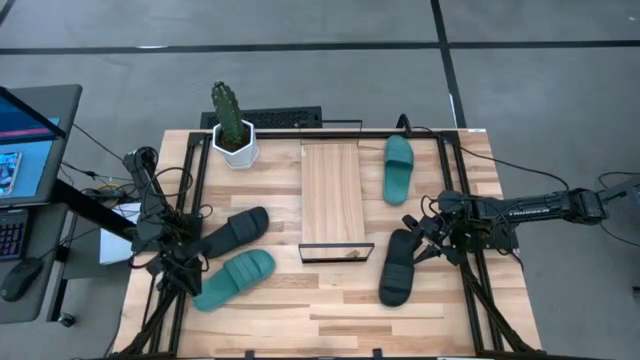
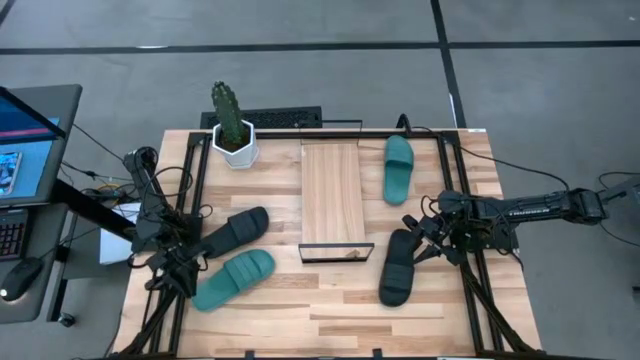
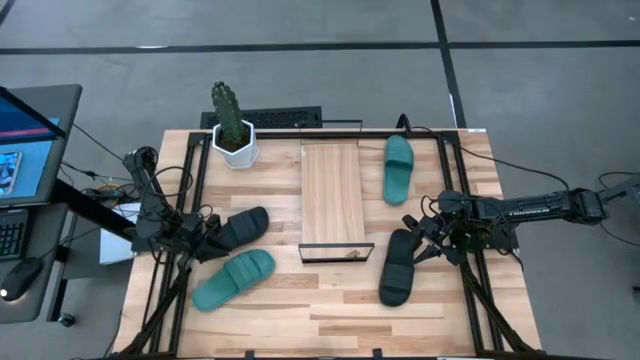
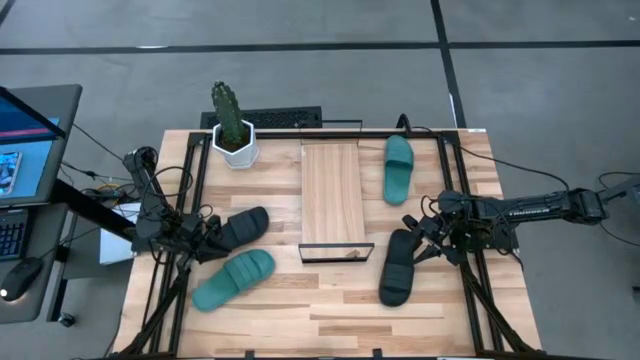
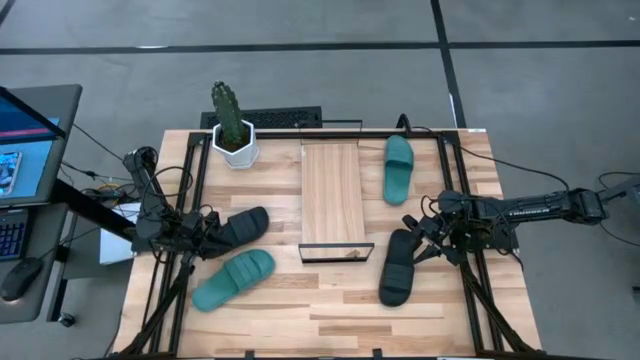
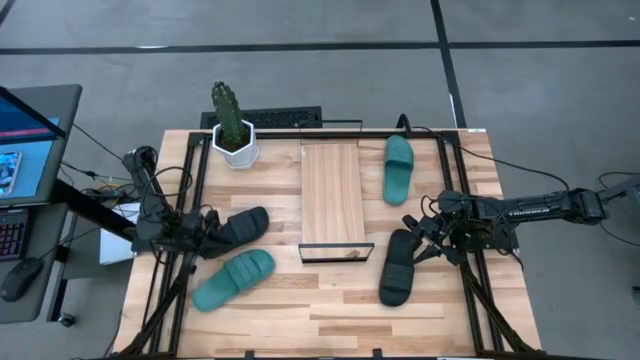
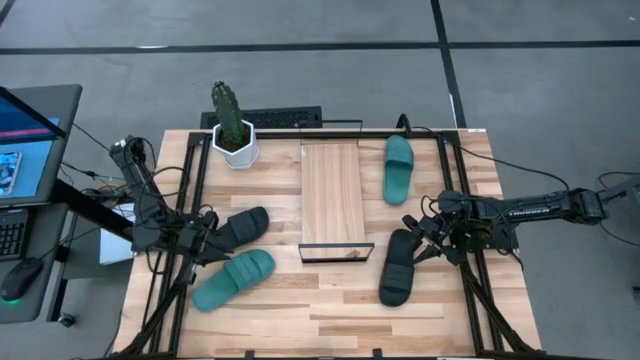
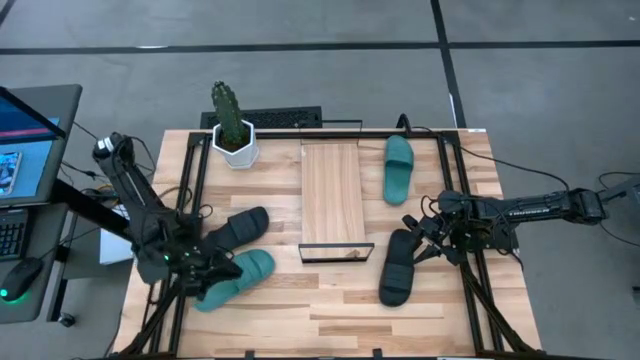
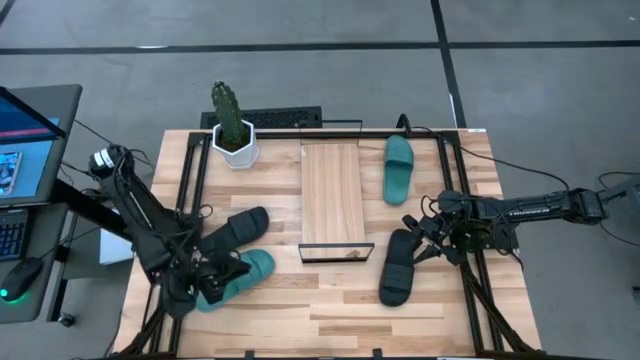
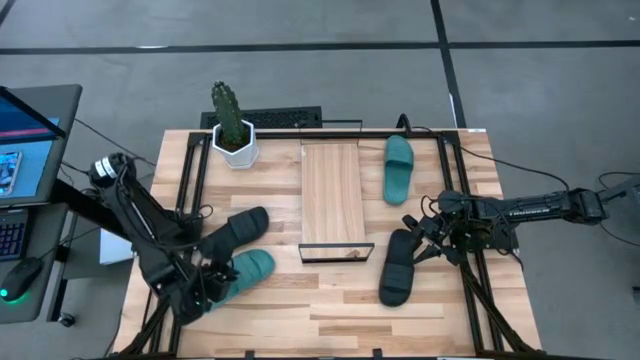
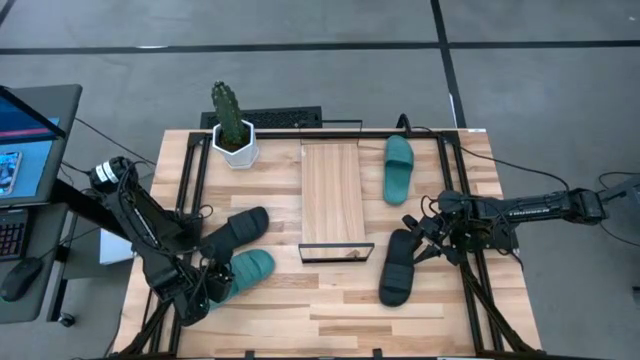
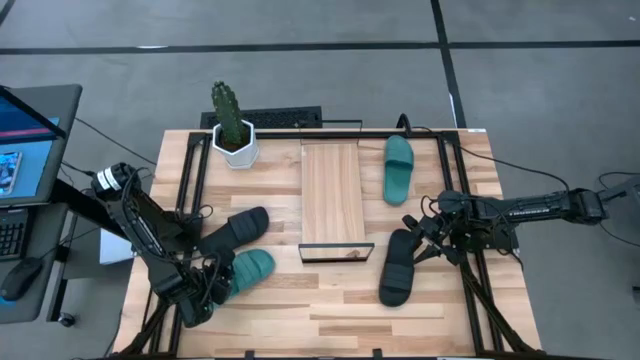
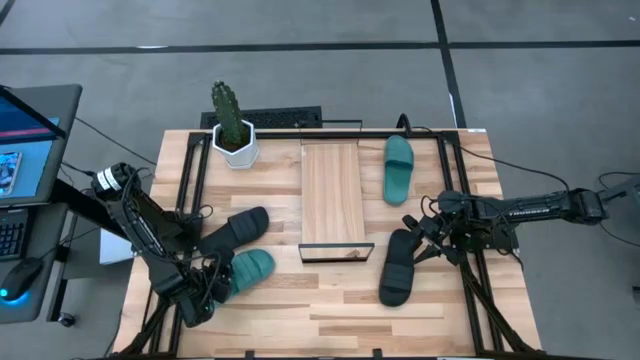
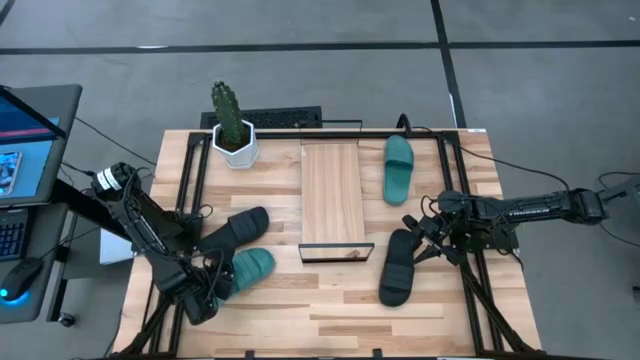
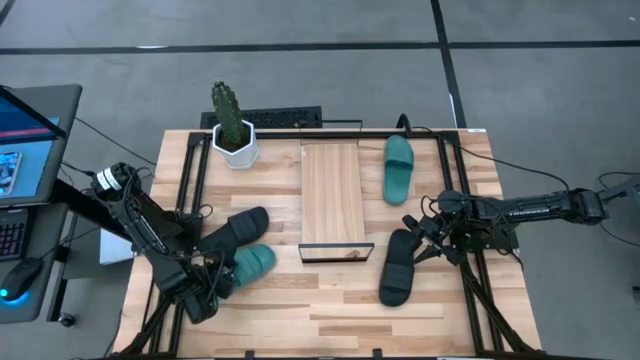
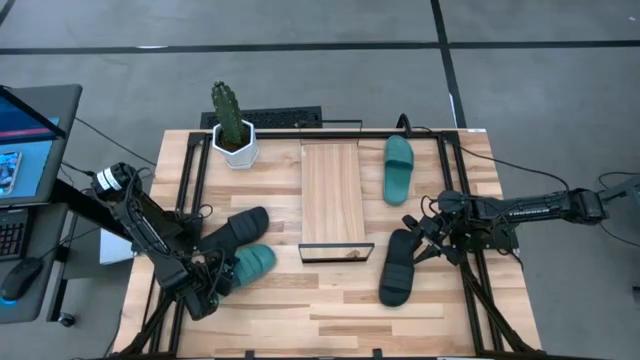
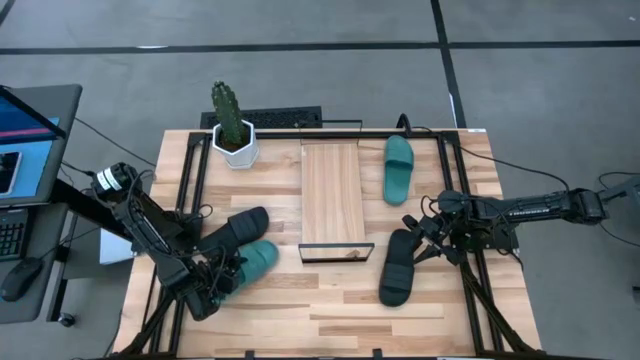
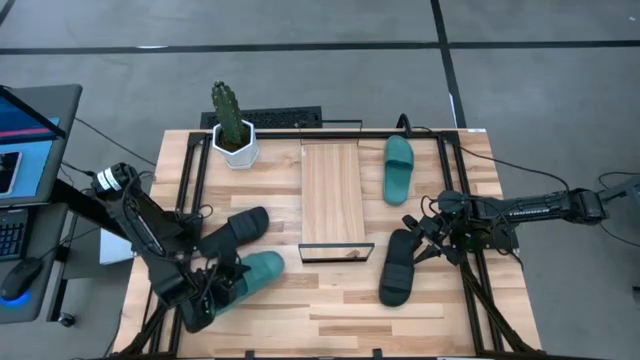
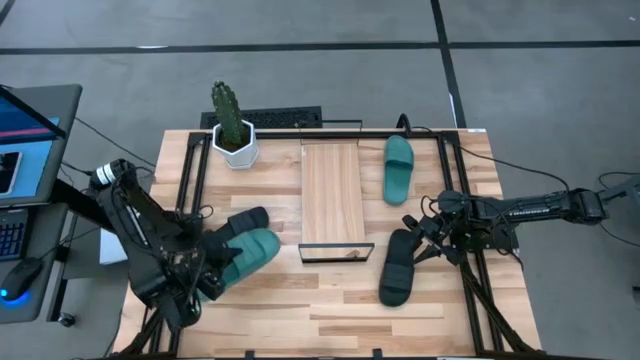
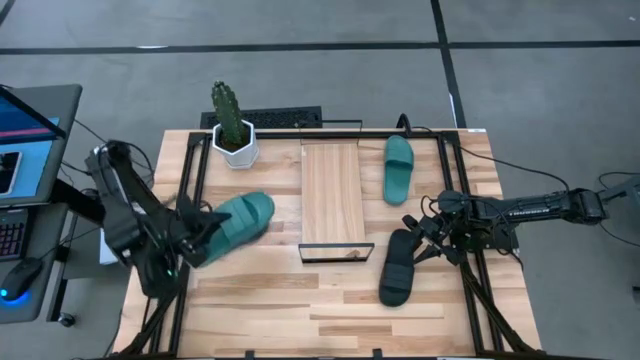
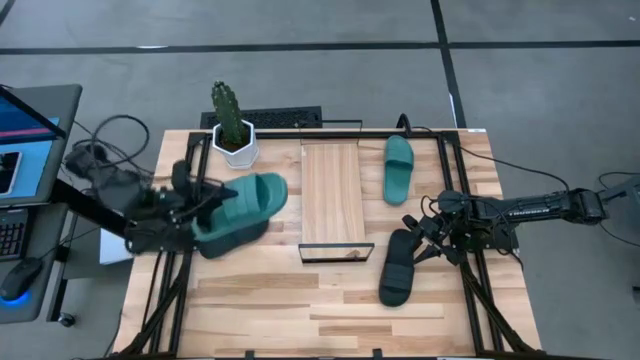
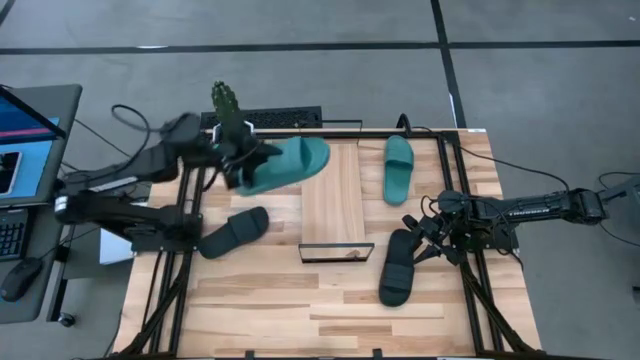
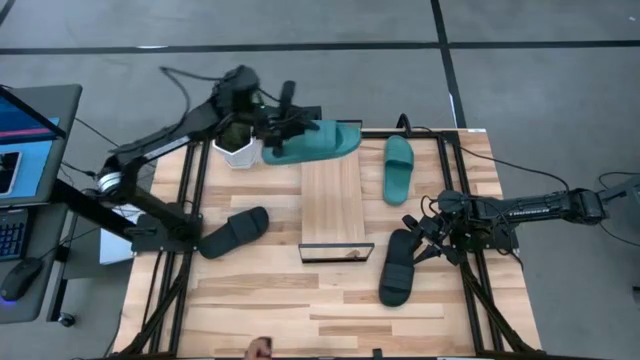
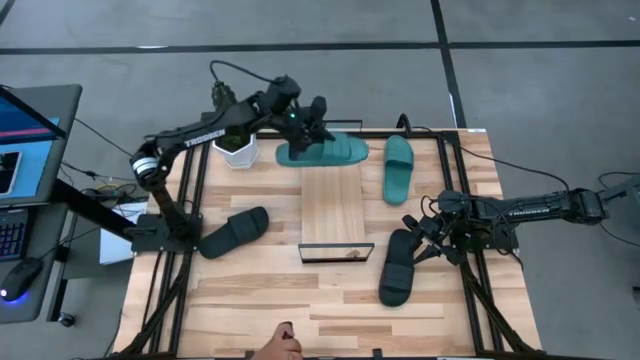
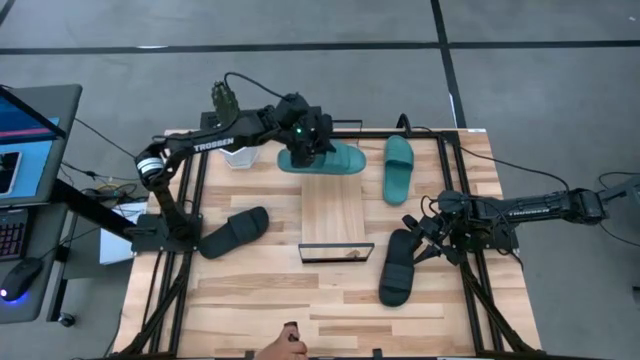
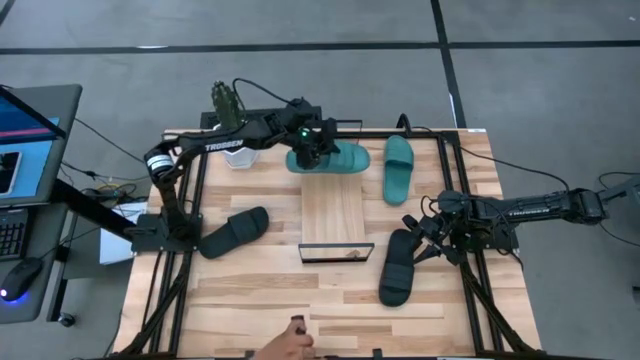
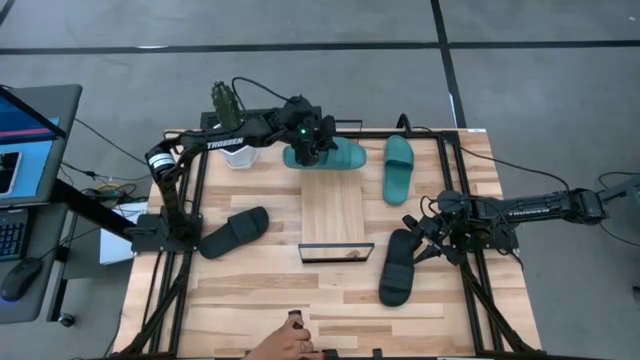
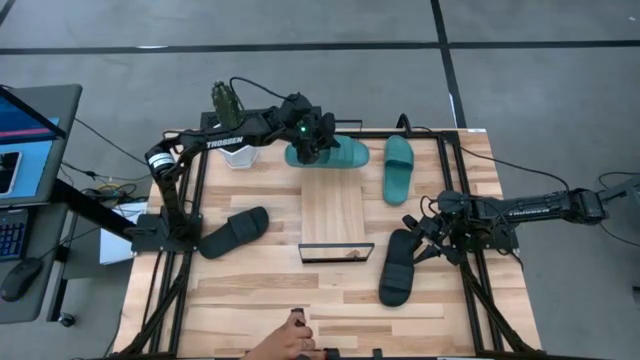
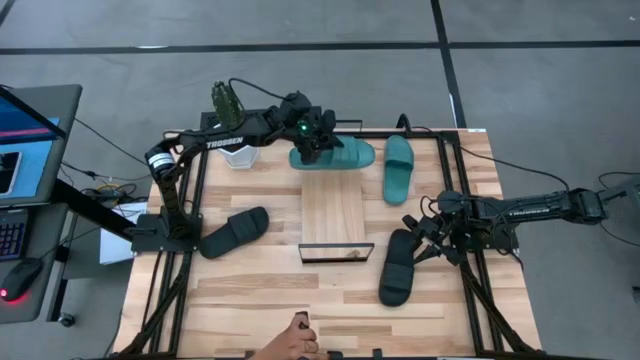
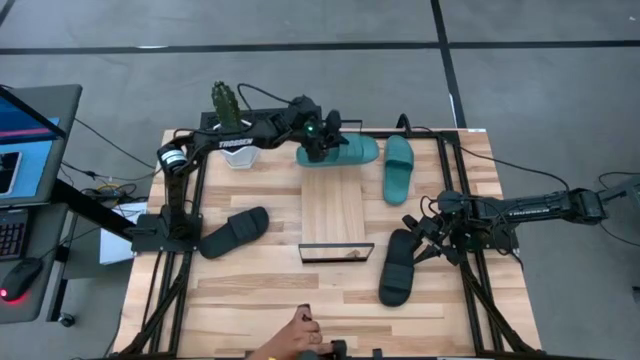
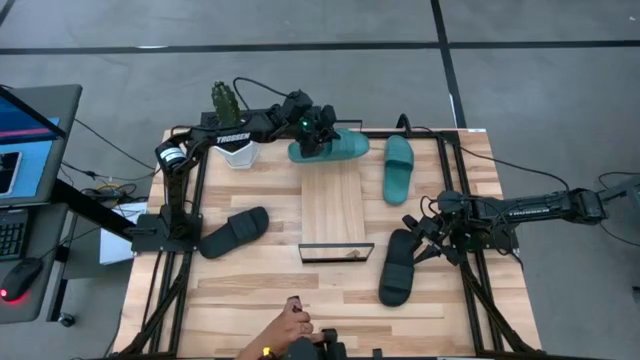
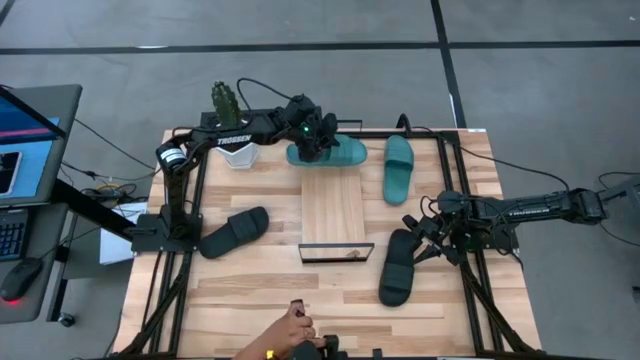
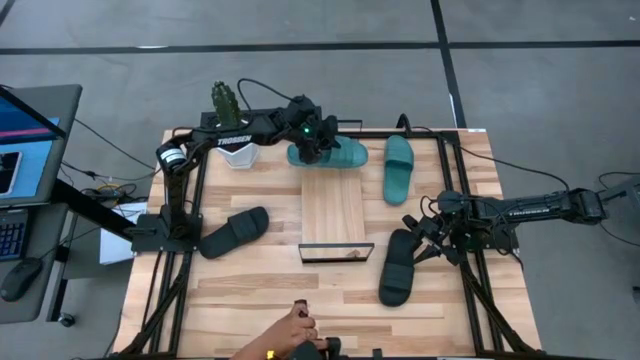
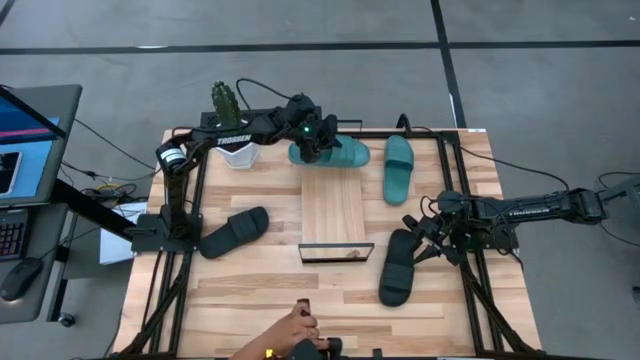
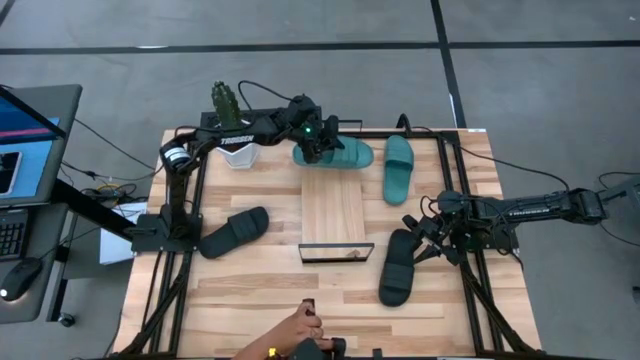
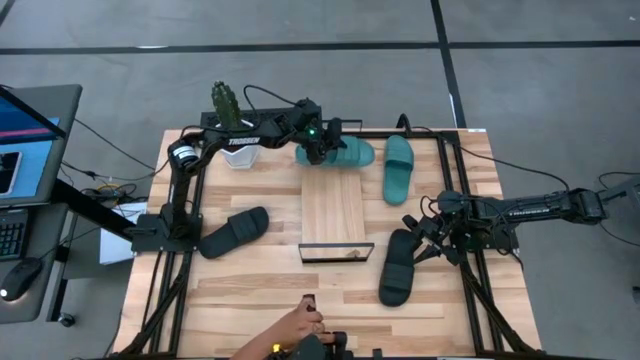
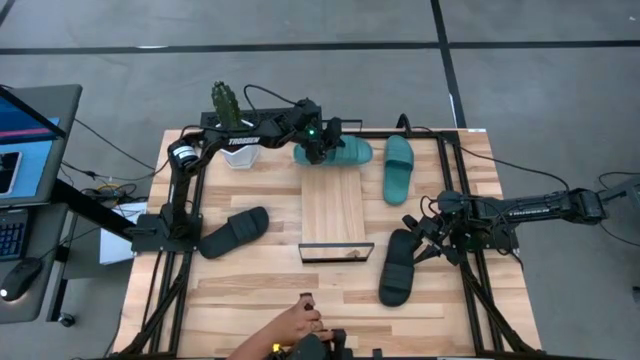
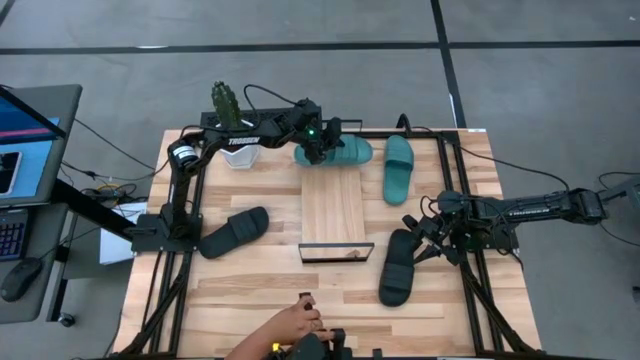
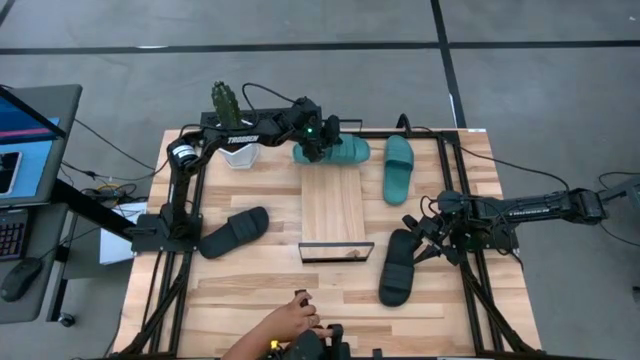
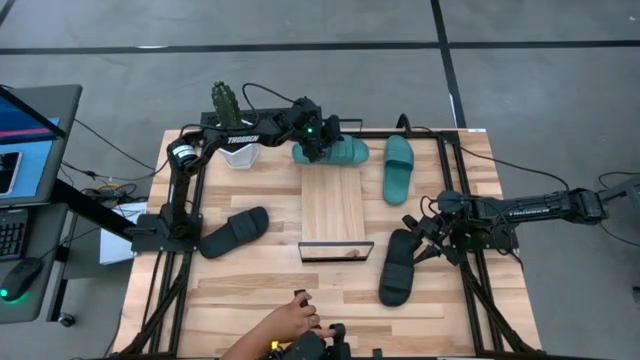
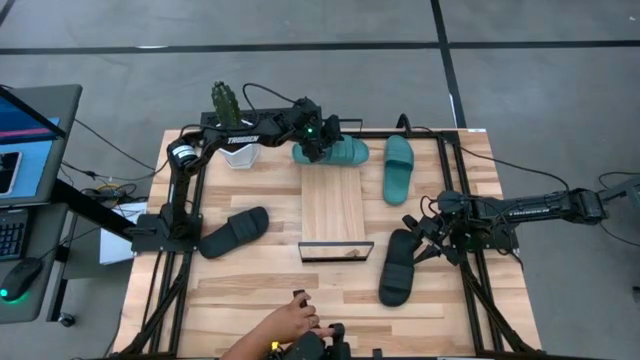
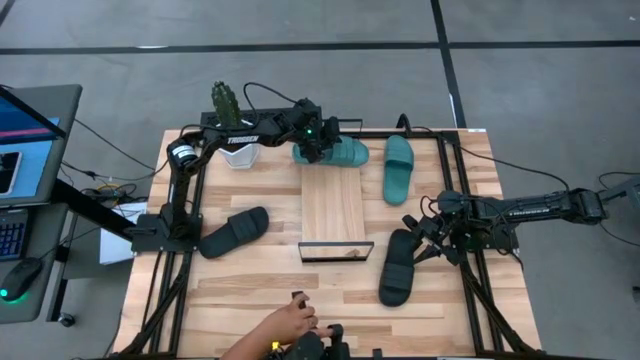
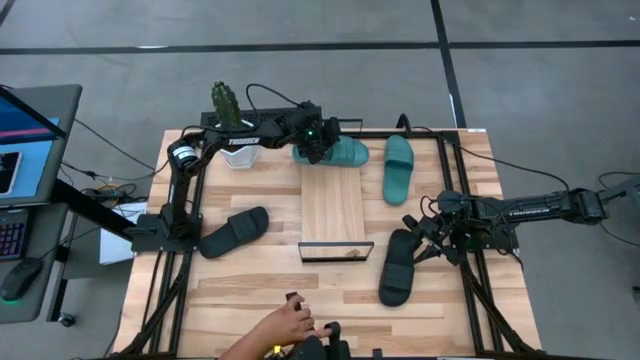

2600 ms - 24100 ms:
Task: Pick and place slides into the shelf
Put the left green slide on the shelf
